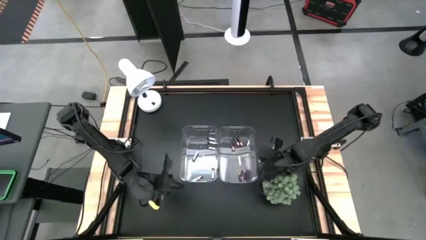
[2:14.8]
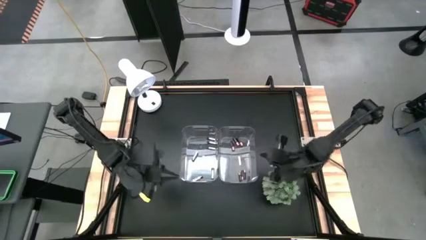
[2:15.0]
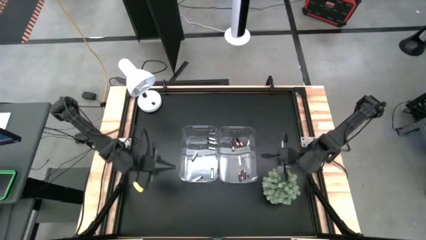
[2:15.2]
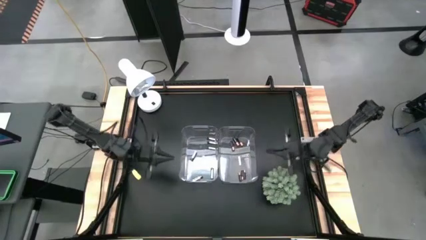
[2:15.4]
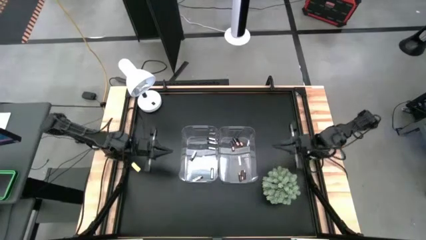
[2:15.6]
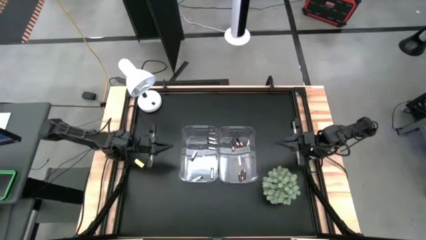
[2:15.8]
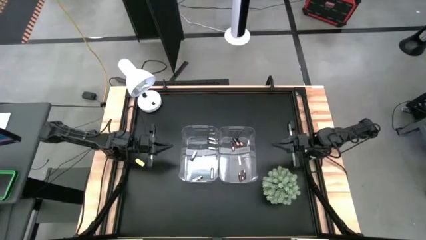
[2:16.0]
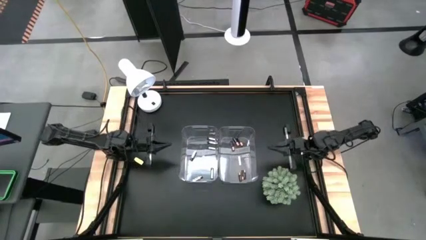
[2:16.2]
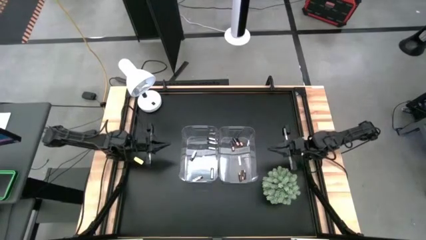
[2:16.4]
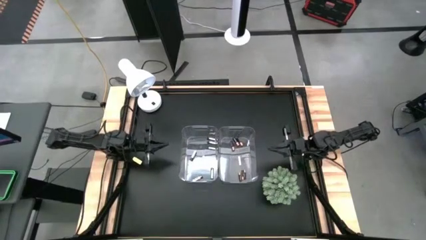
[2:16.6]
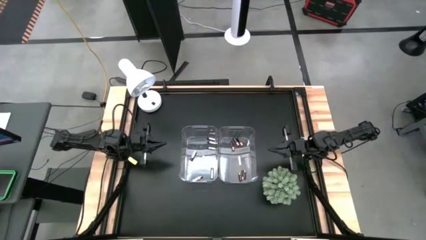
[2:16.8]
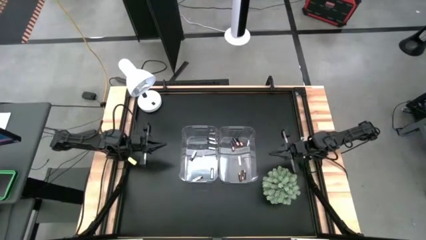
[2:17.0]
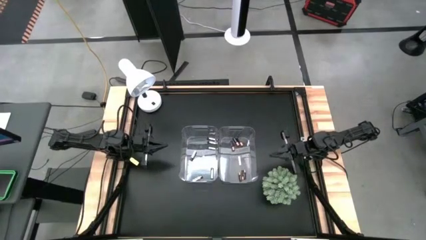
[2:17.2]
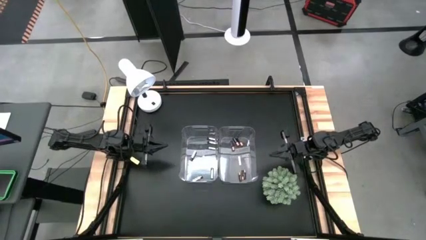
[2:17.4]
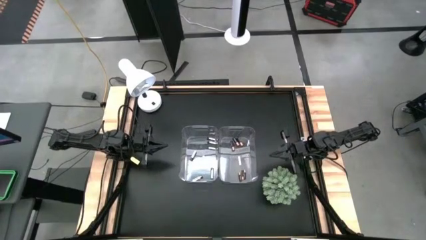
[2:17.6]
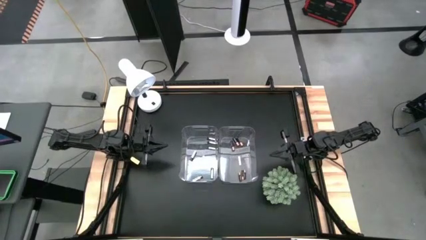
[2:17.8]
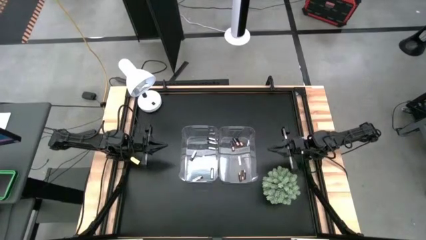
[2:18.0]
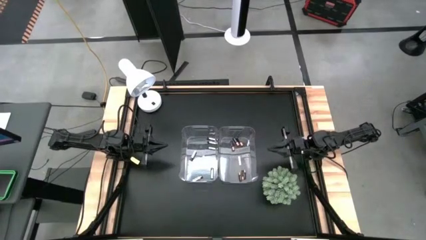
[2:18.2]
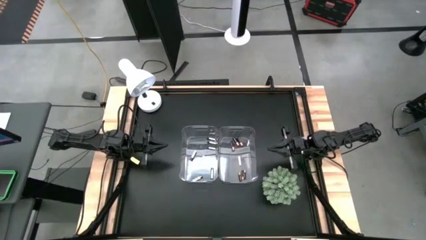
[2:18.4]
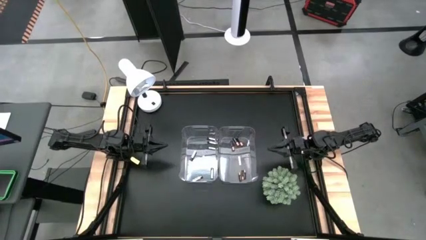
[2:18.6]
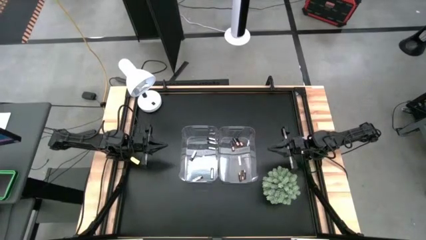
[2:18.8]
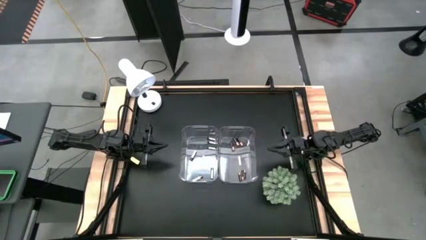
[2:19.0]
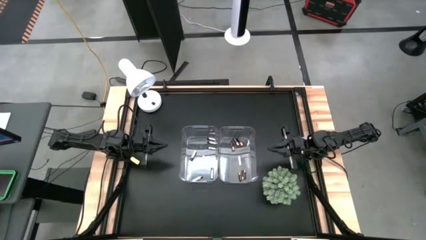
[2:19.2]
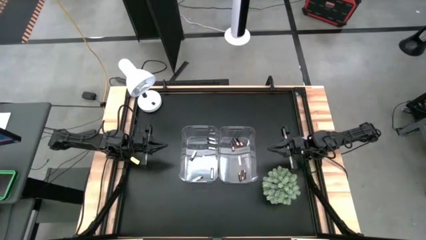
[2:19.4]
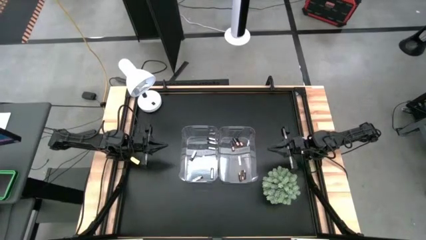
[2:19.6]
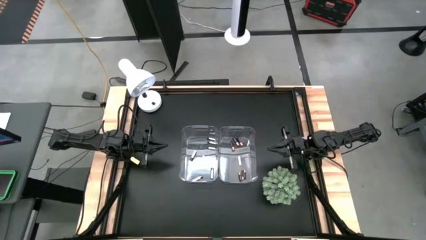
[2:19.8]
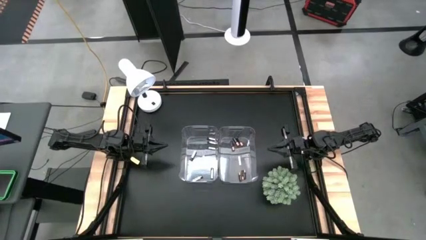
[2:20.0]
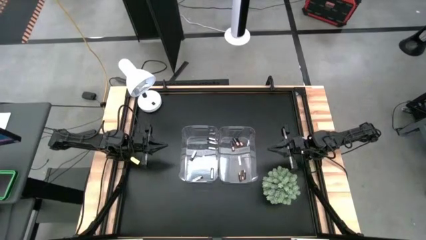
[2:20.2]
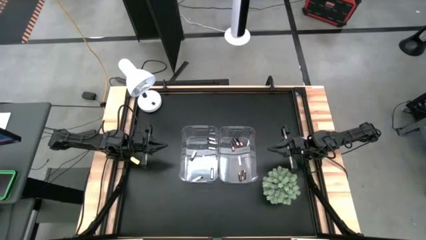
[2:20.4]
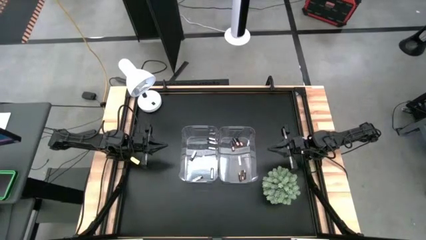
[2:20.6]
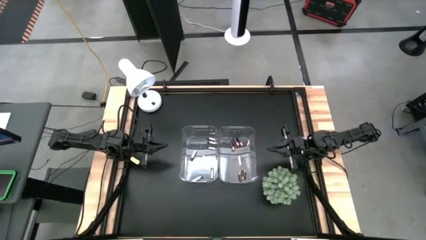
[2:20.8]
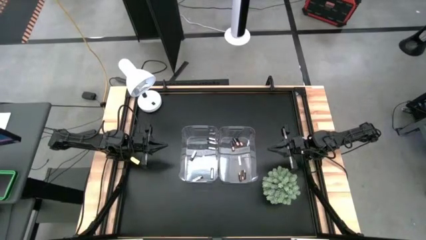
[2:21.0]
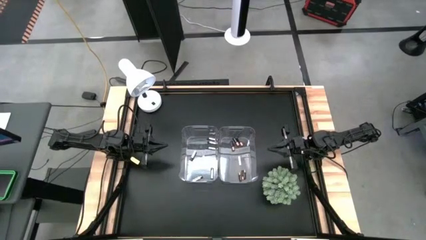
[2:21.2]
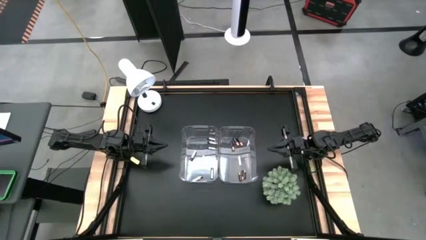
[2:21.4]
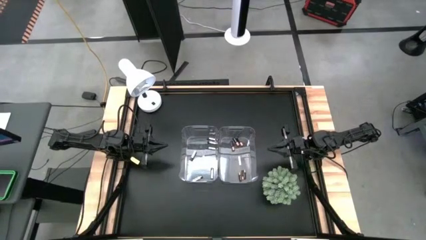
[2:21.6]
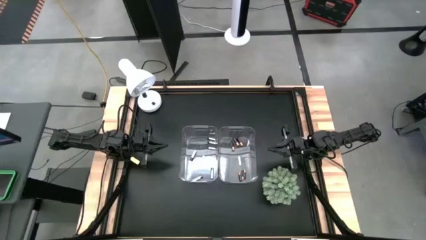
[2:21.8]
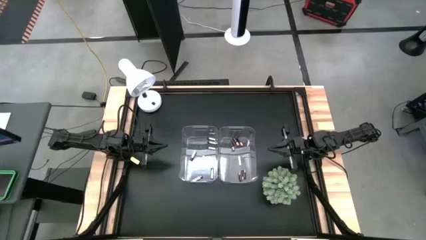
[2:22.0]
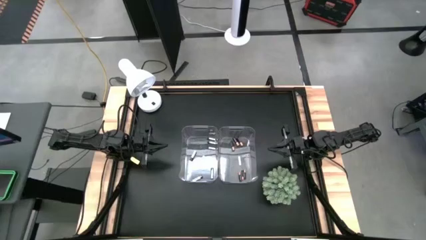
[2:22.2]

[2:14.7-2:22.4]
Task: Sort batteries
Return to Home Position

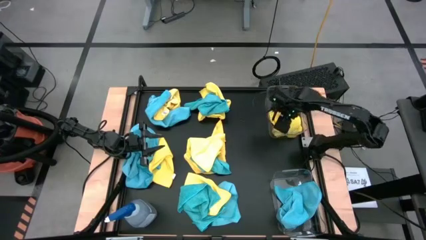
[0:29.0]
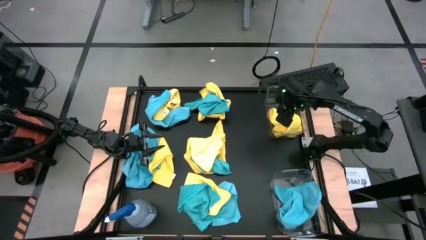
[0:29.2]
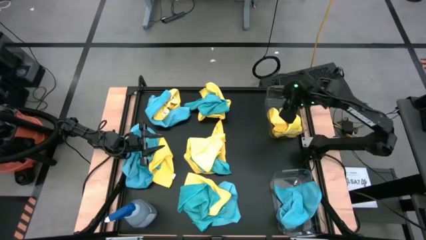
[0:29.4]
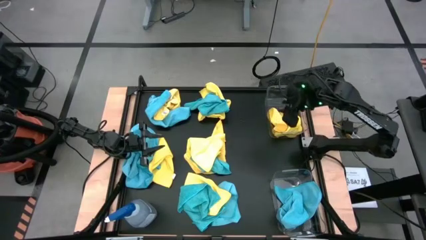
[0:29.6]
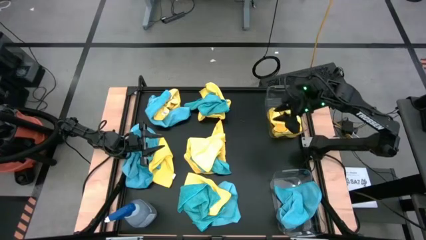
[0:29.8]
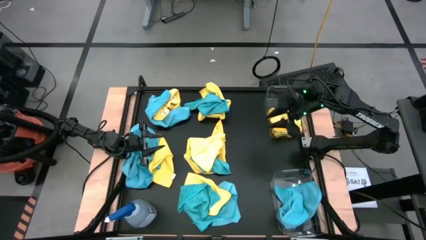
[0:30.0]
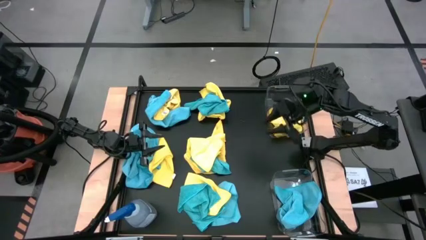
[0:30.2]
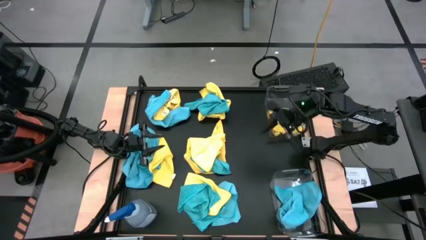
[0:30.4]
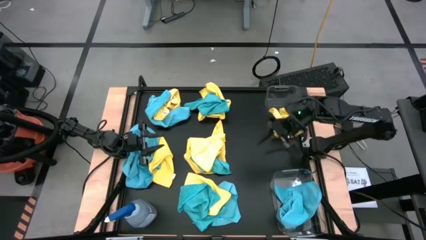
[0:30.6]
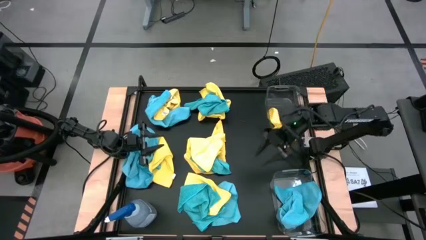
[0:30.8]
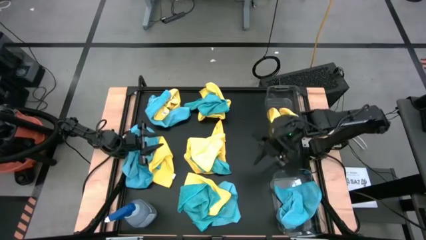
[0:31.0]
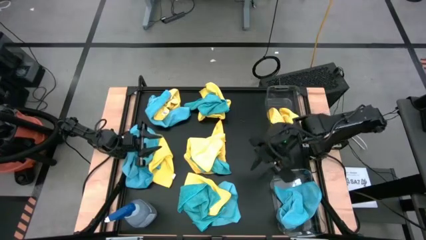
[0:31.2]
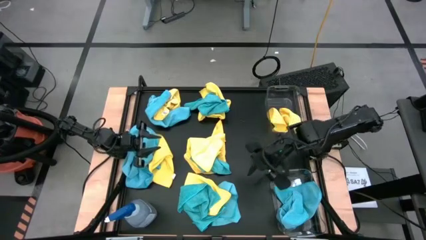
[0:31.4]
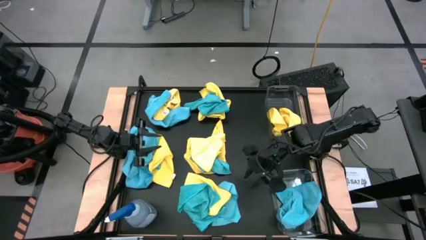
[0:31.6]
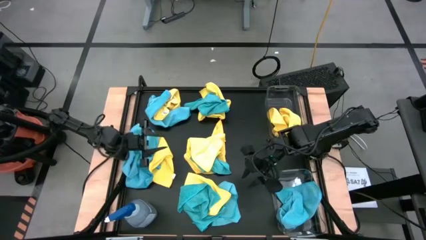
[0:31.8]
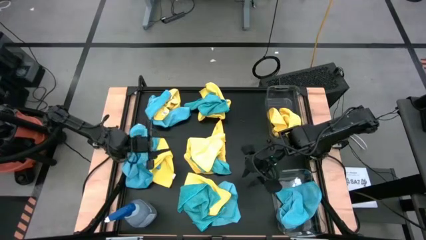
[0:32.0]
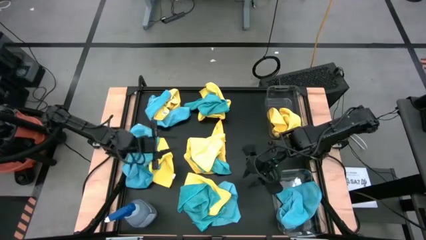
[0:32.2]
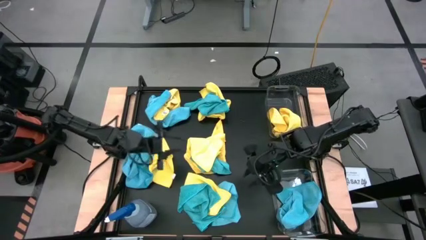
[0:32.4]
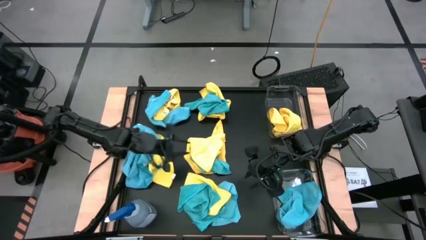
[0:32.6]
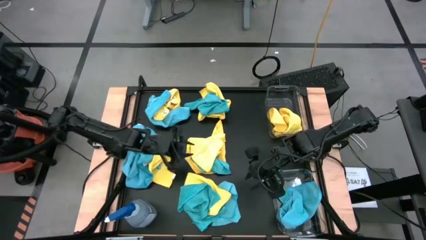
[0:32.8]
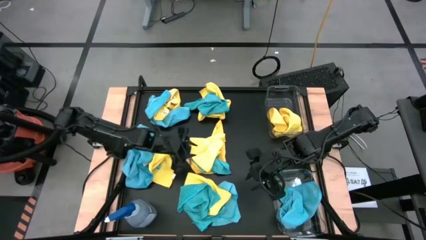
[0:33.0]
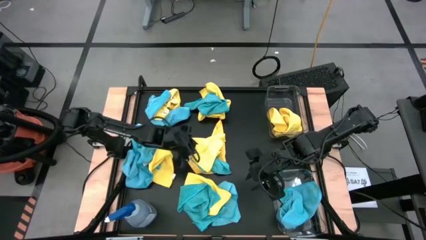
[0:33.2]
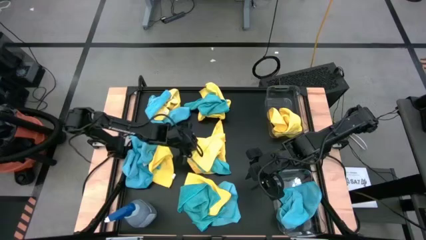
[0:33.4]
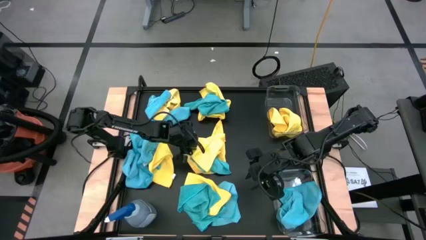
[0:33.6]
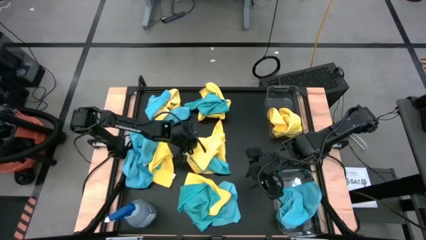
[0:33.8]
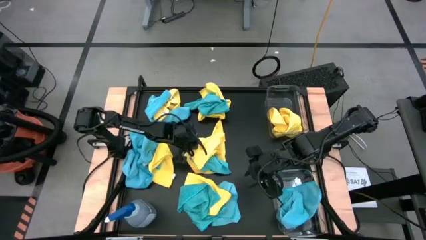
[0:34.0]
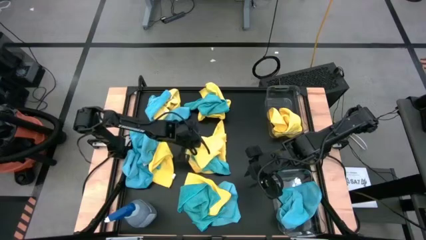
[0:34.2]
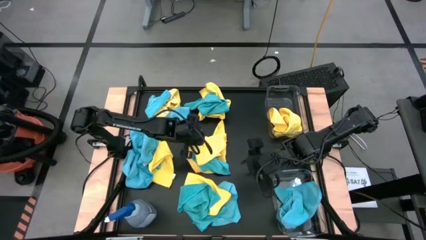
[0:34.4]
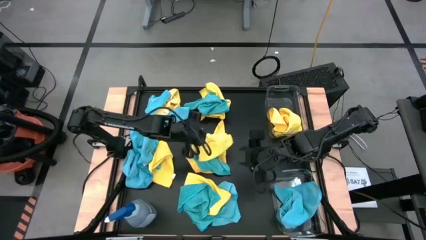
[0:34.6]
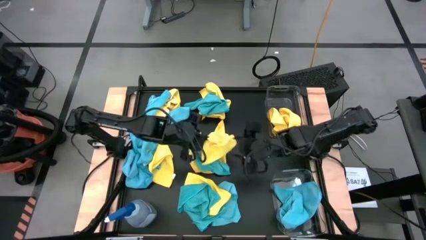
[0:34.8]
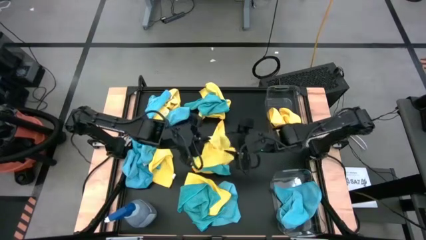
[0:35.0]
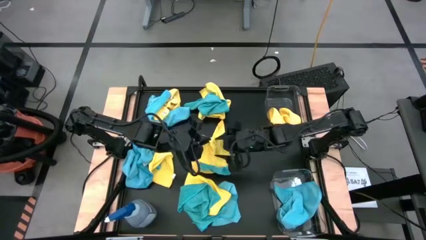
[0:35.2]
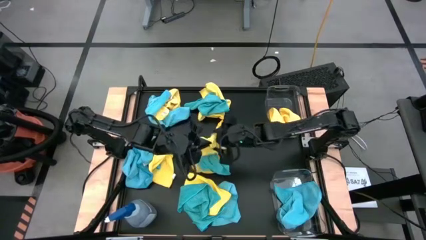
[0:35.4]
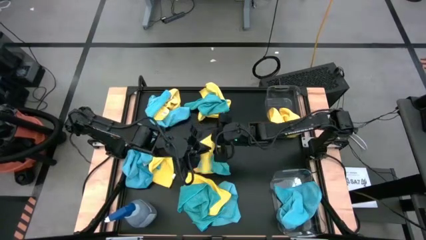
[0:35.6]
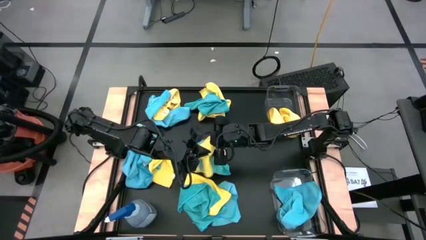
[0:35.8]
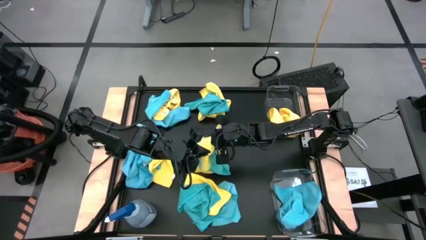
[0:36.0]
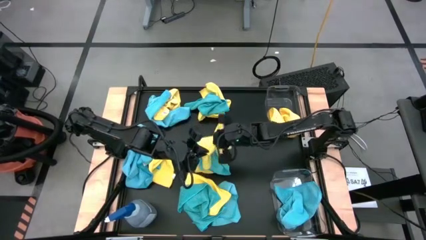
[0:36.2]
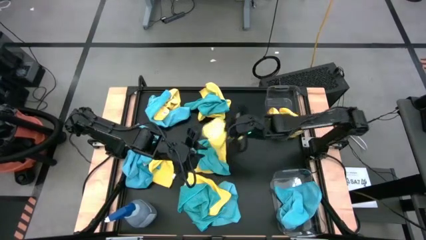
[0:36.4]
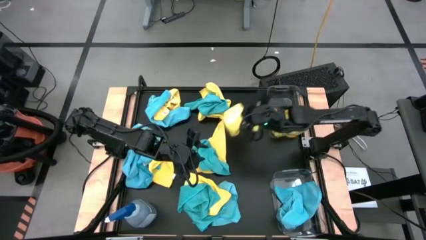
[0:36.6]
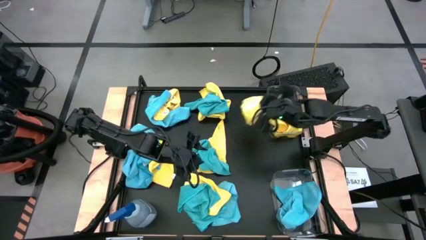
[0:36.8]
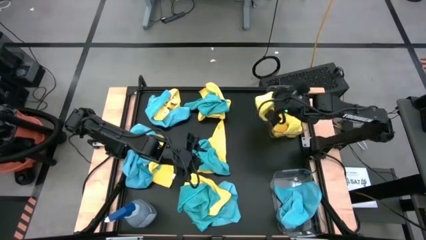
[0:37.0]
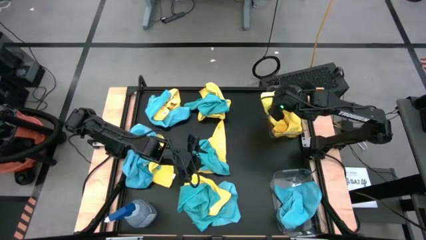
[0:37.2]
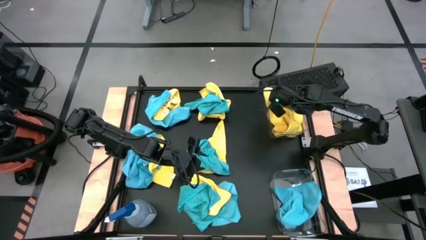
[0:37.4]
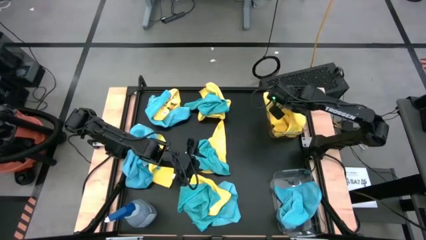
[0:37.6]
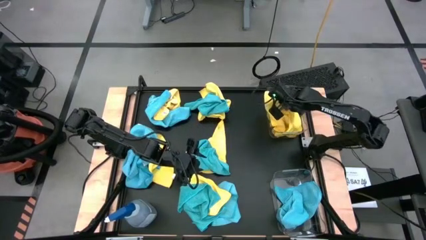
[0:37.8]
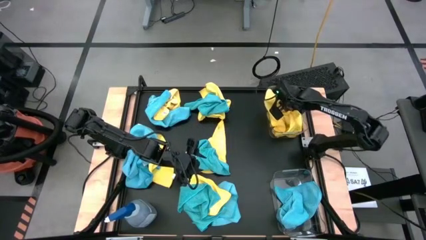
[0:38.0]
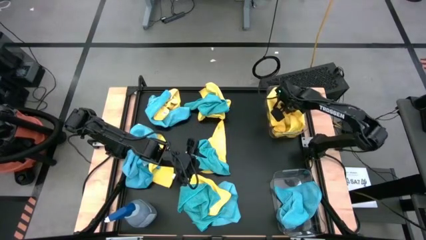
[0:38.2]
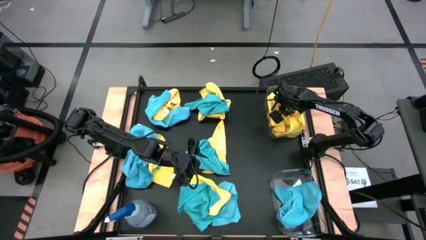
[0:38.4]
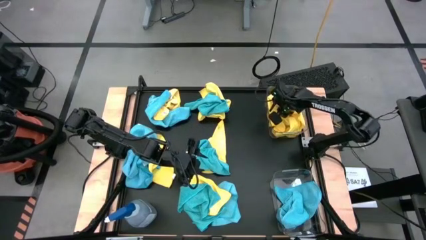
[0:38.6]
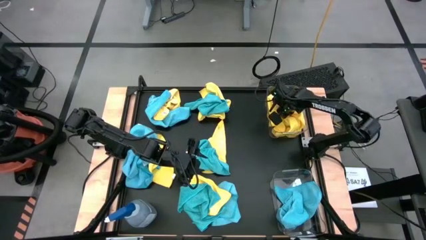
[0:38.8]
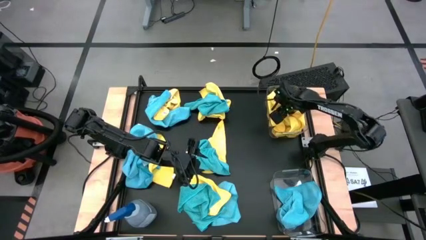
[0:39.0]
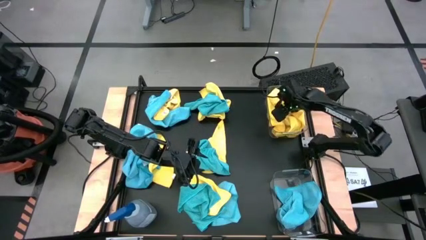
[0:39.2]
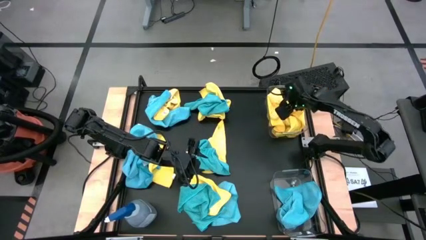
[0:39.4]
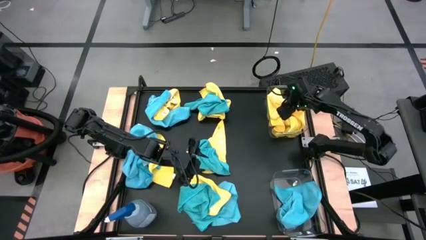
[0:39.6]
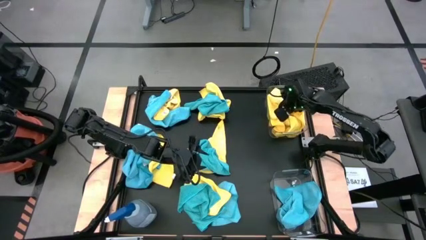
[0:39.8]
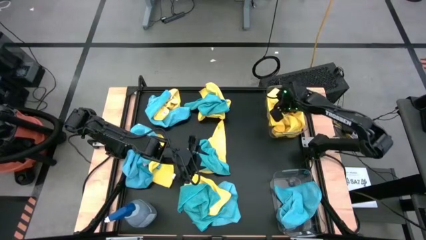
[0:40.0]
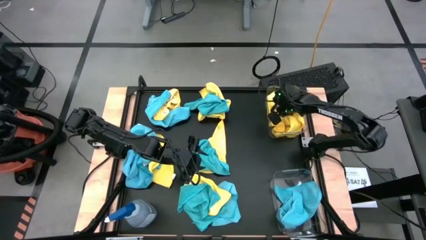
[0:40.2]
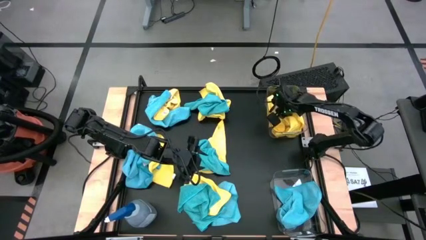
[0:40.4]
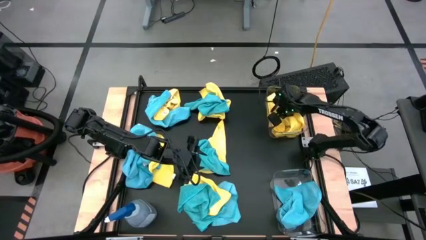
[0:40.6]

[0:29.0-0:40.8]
Task: Sort microfiber towel by color & place in baskets
Put the yellow towel into the top transparent bin
